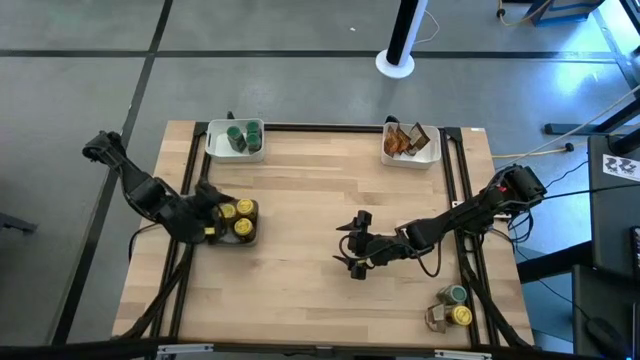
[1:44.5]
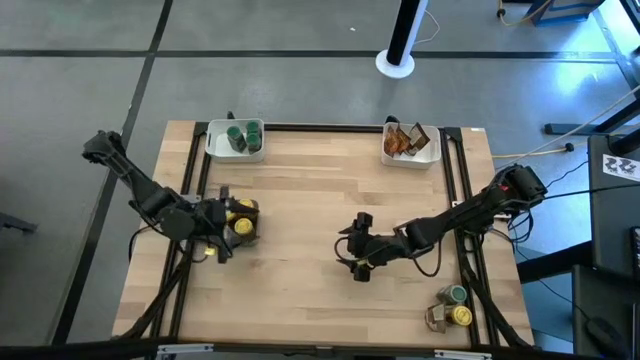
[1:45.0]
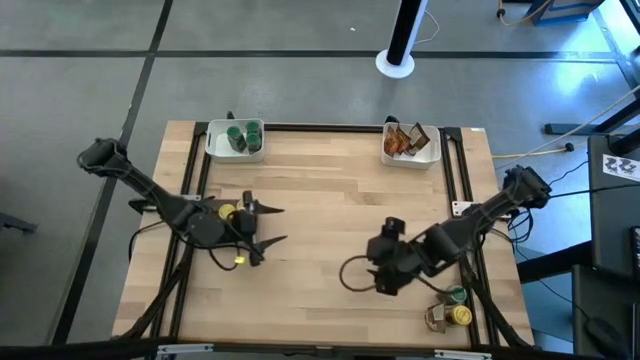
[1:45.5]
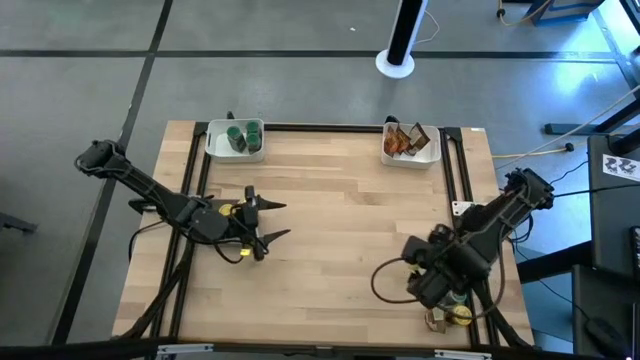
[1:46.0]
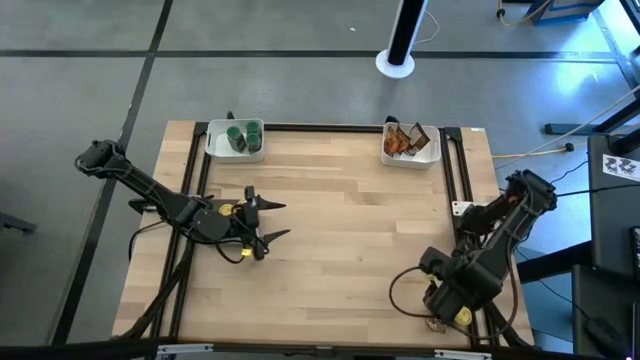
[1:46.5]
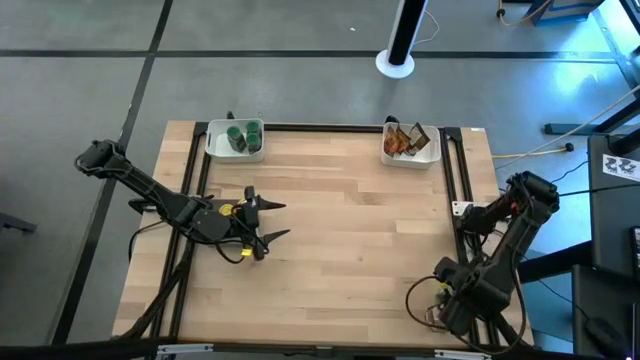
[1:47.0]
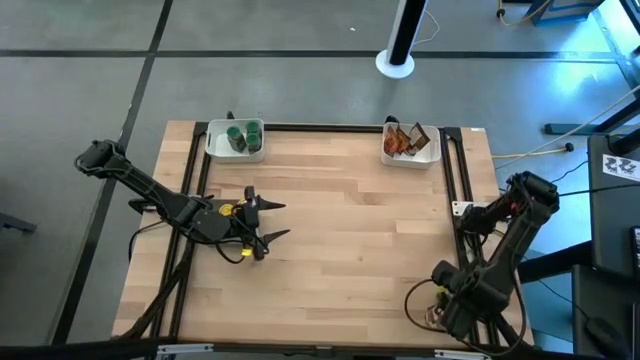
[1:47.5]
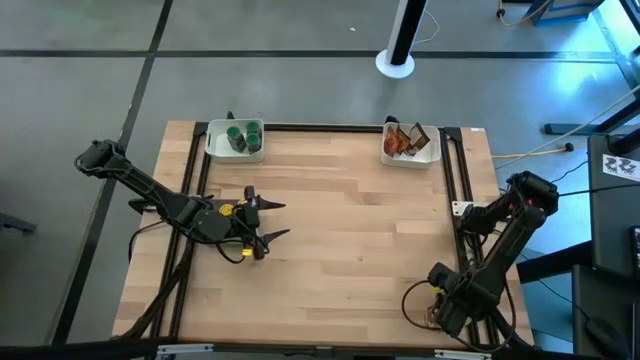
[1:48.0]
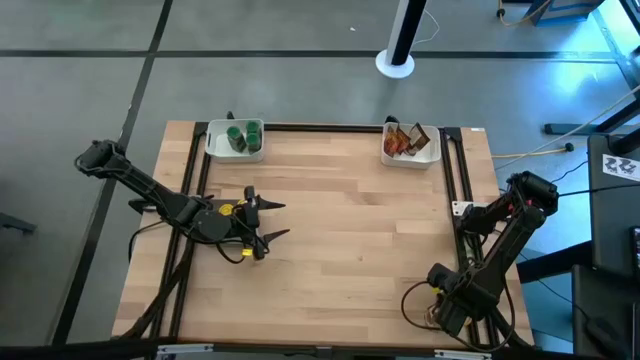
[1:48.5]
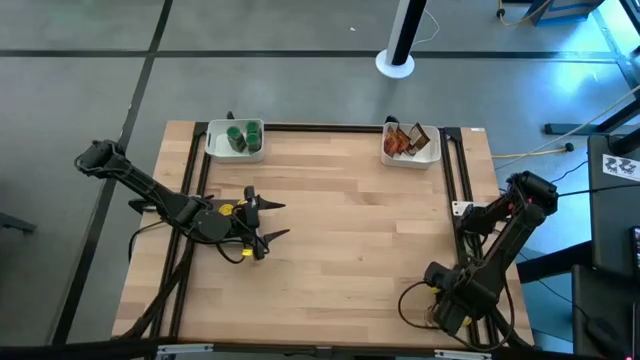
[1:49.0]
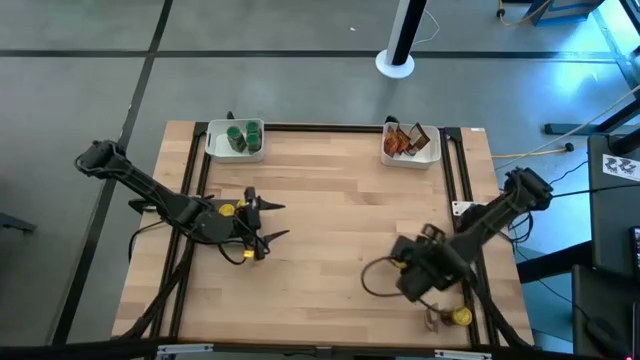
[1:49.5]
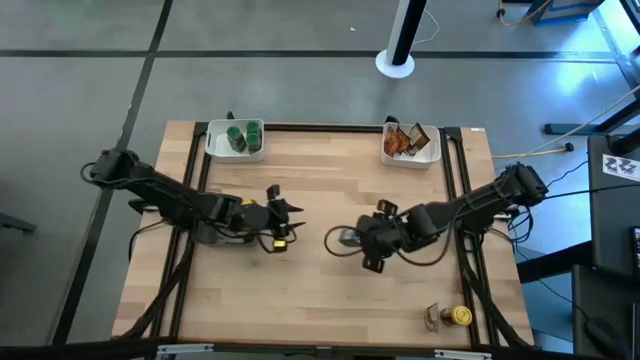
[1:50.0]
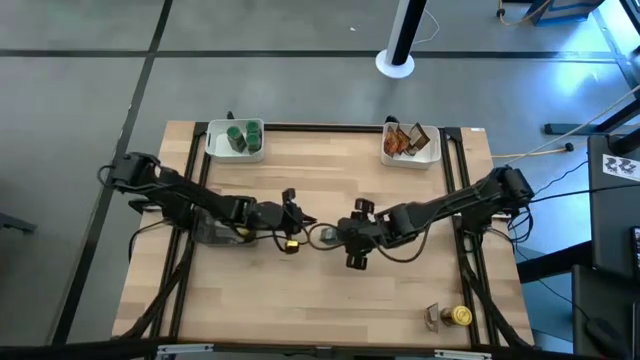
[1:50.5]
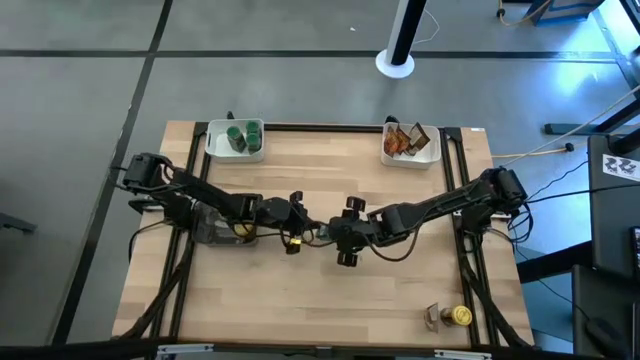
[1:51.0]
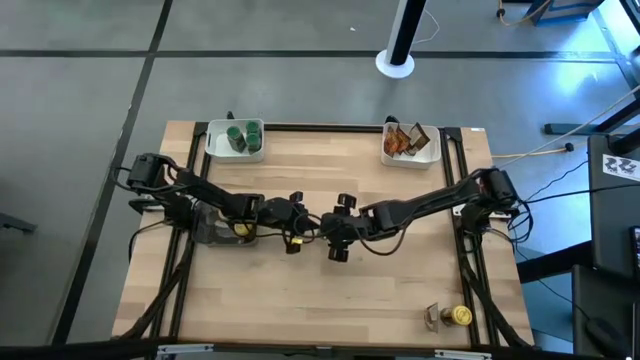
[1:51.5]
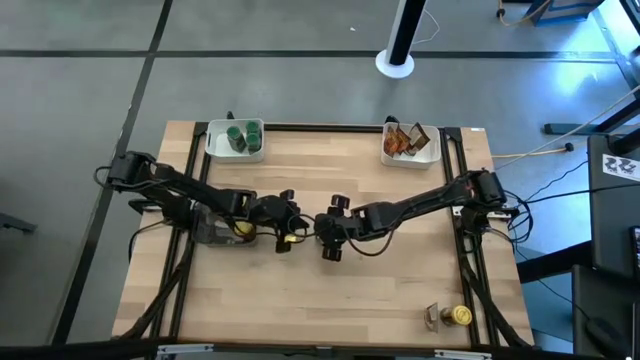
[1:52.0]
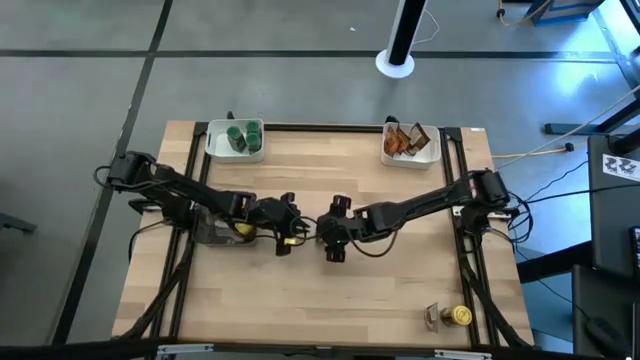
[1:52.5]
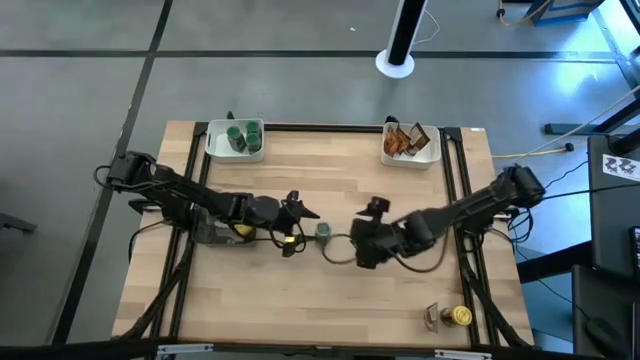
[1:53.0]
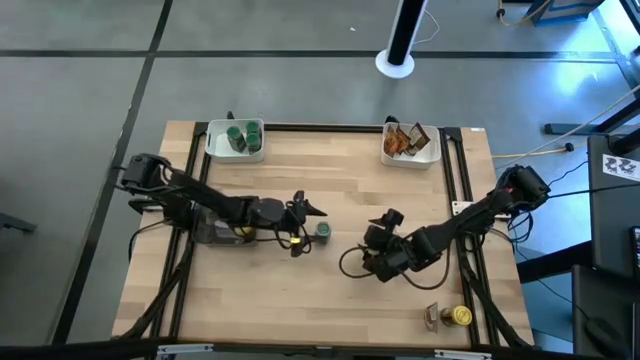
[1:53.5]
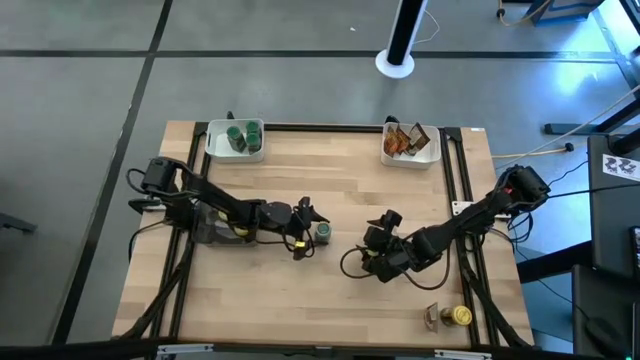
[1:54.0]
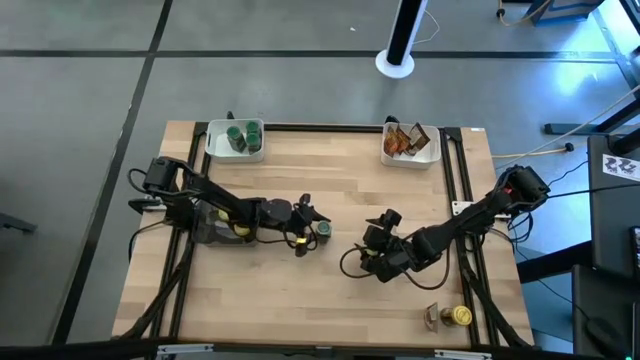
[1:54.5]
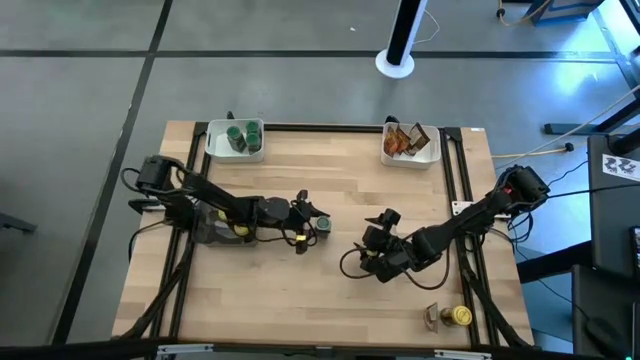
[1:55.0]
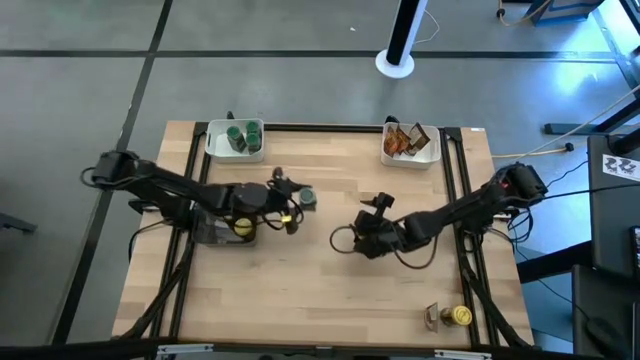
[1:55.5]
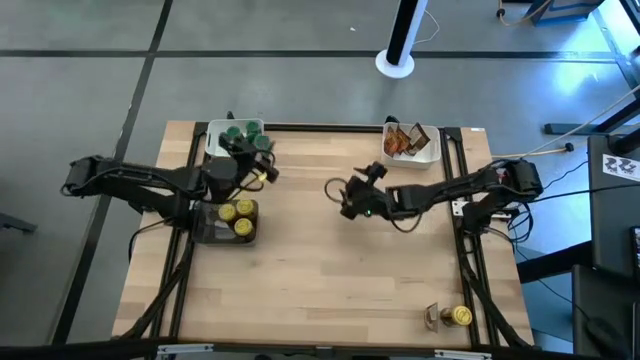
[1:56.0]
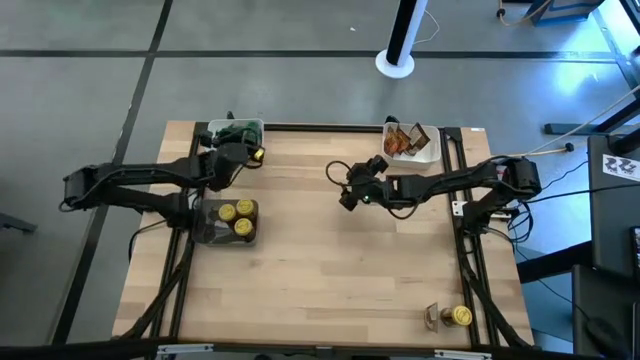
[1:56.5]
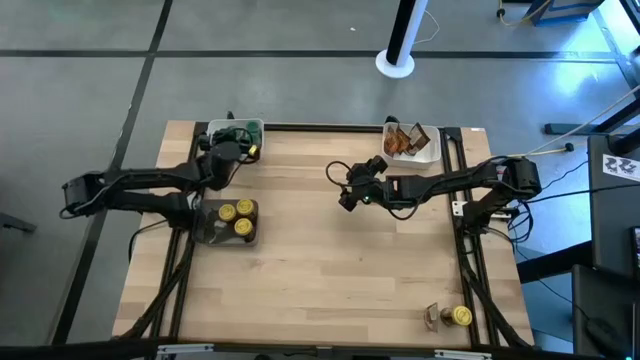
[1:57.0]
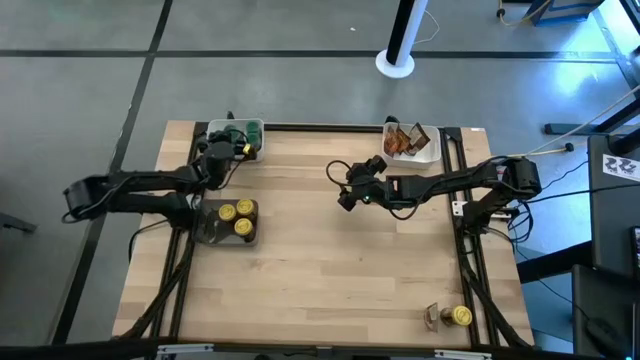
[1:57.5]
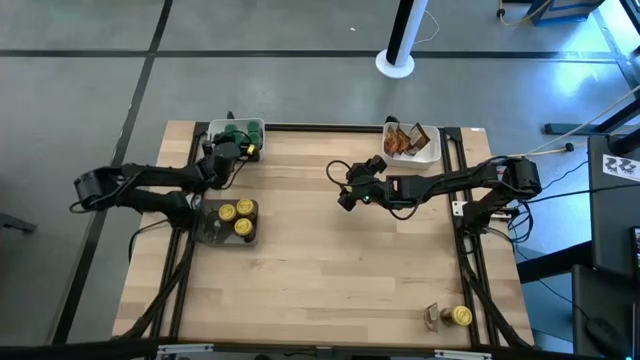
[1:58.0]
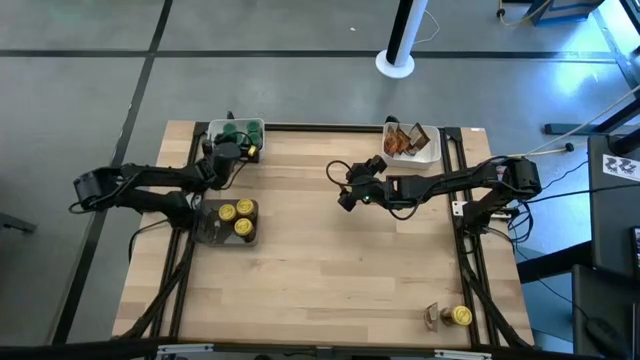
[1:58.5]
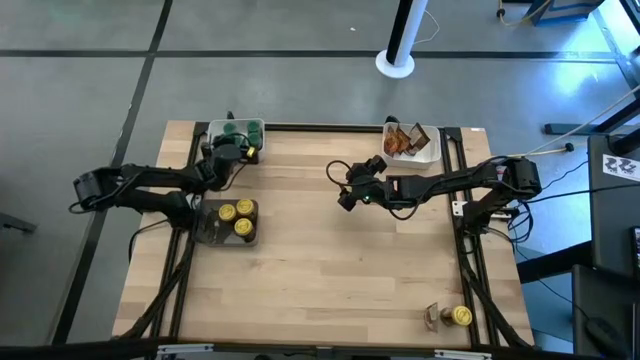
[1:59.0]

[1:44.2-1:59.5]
Task: Sort spices by type
Put the green seasoning bottle into the top left white bin

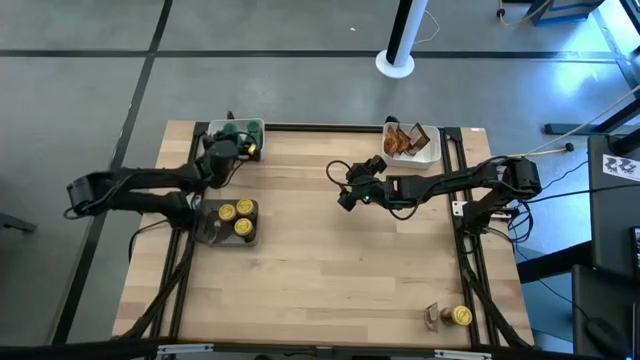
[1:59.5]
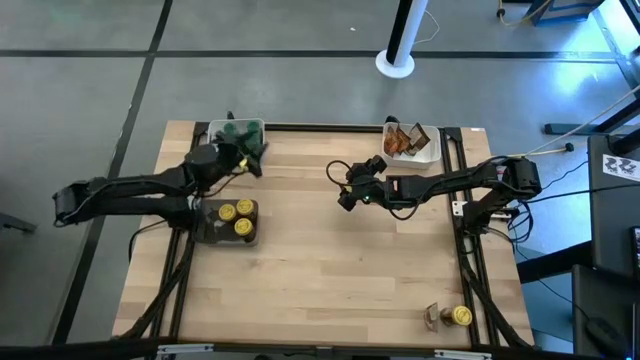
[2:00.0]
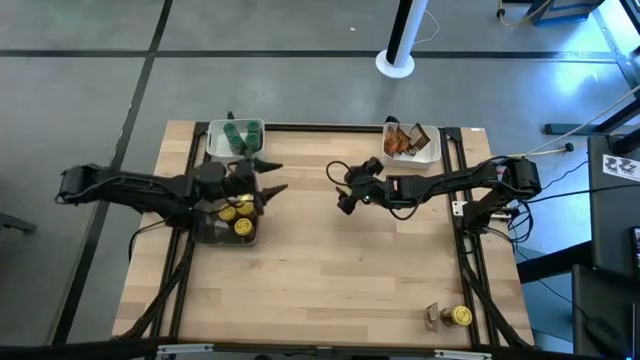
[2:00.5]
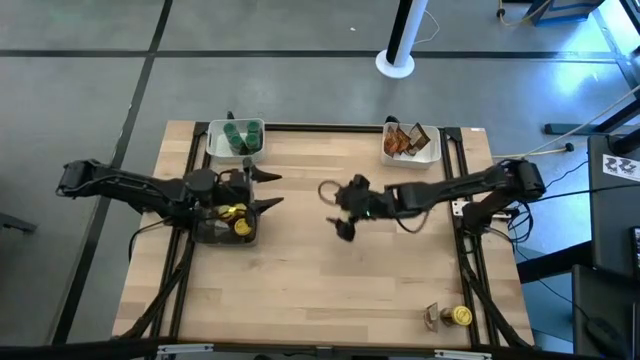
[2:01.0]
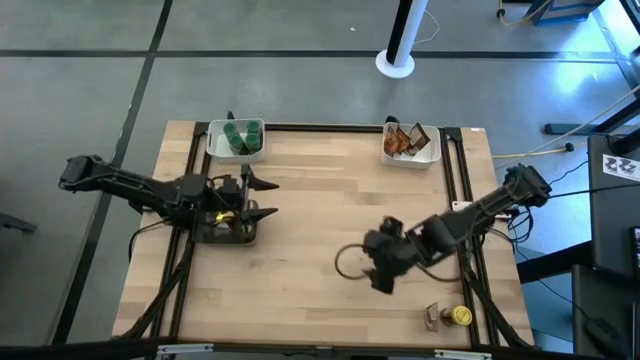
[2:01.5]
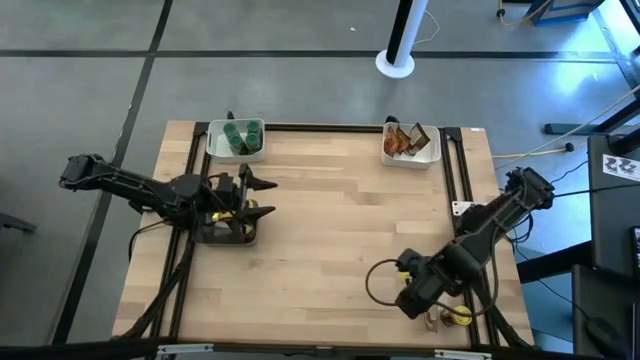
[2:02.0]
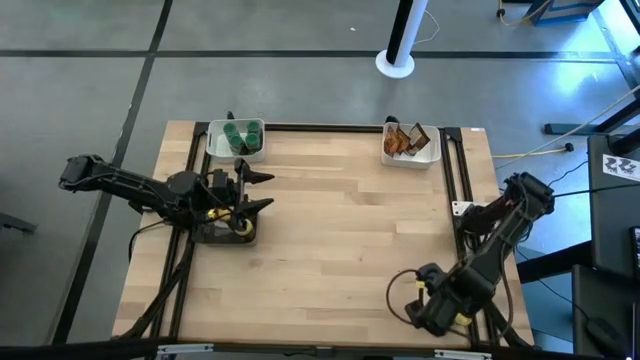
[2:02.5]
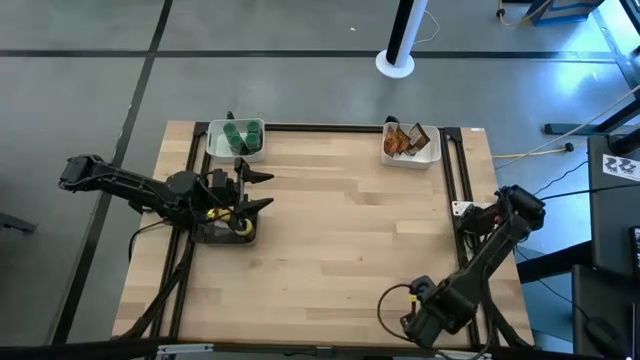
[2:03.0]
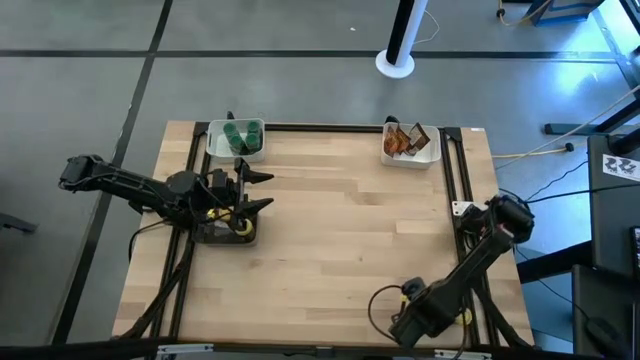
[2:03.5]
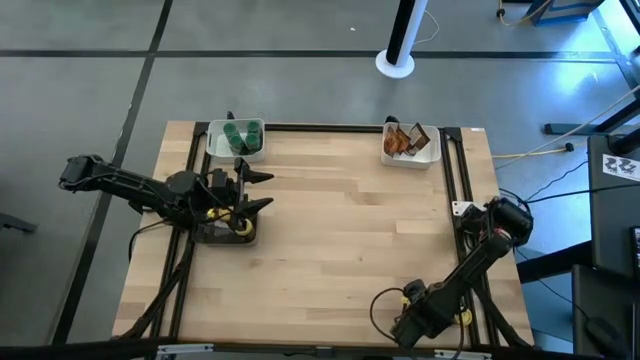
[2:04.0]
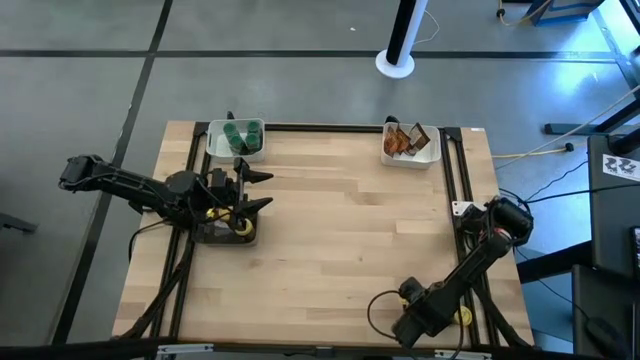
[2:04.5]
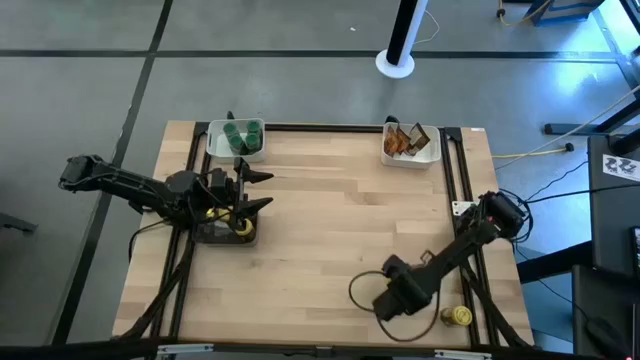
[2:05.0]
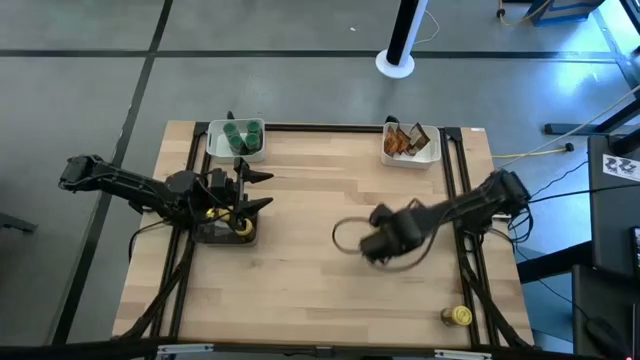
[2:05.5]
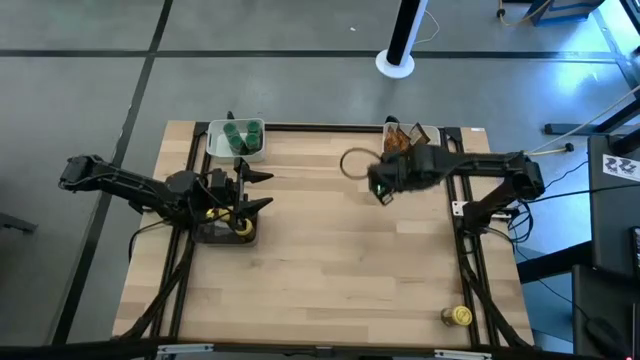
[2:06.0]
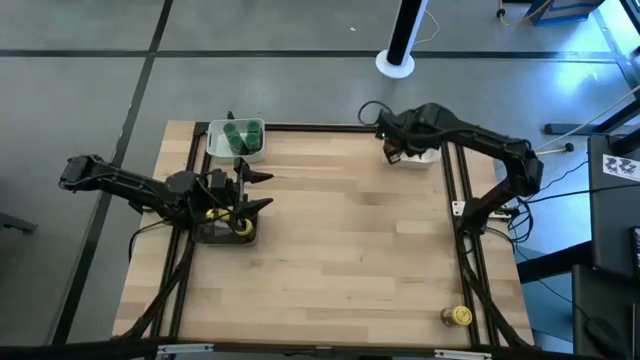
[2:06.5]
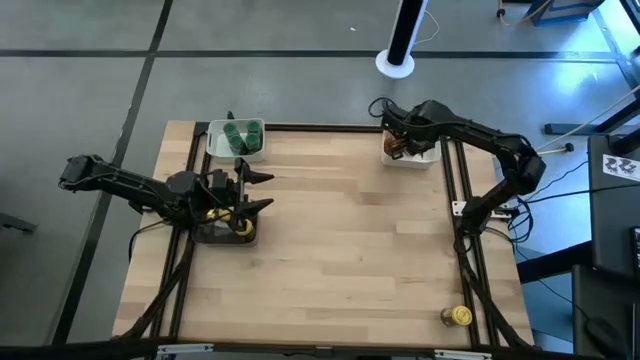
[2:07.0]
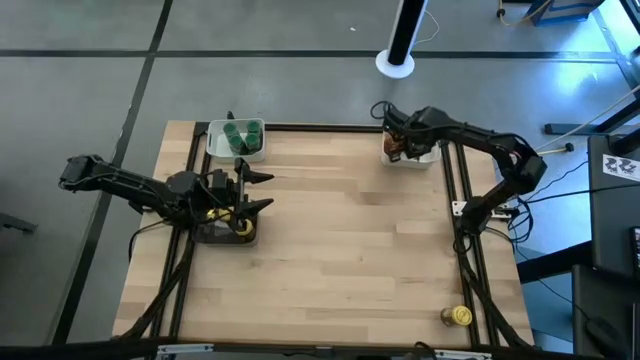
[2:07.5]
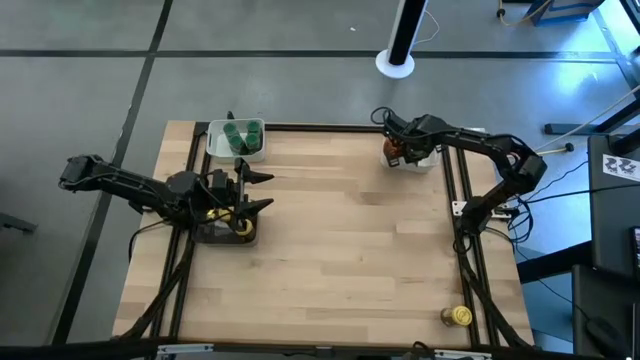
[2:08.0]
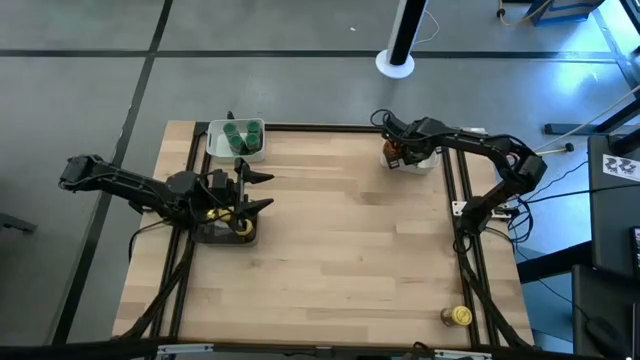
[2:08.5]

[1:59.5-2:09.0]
Put the orange seasoning pack into the top right white bin
